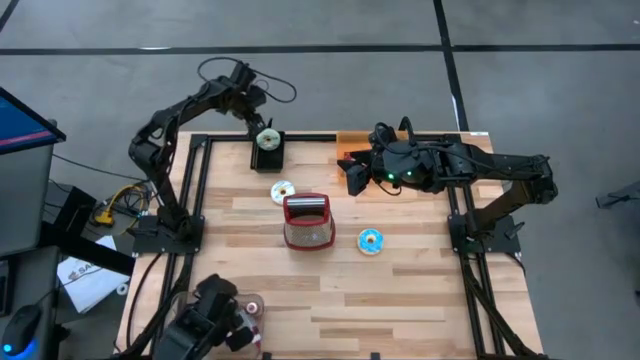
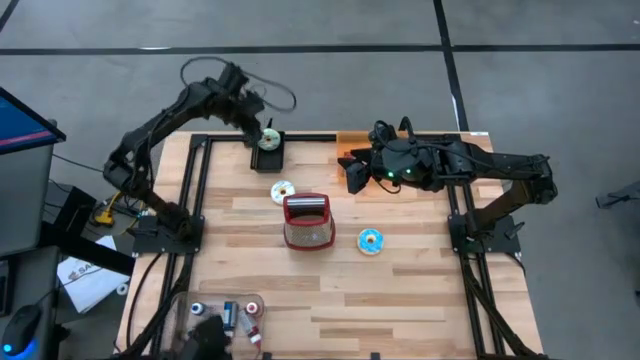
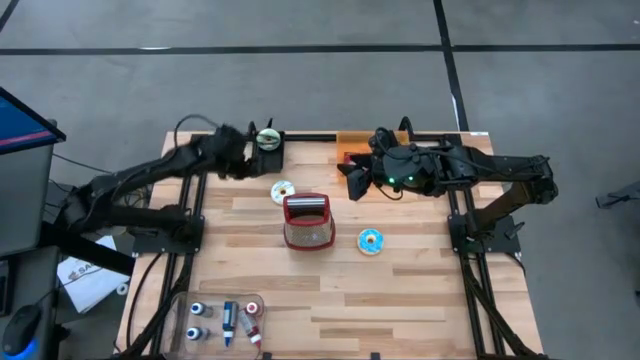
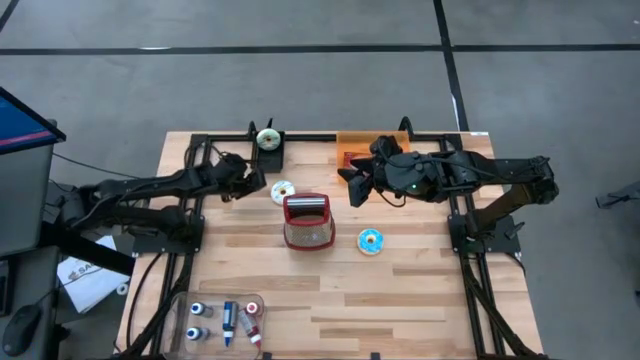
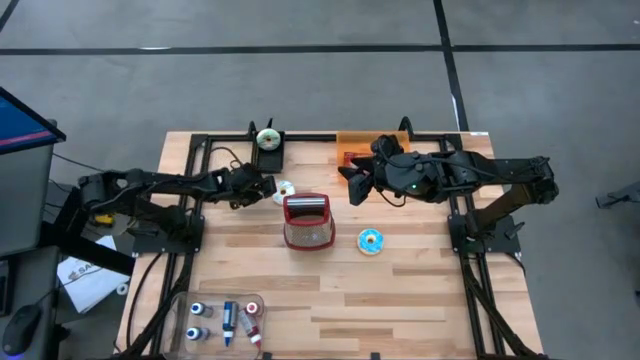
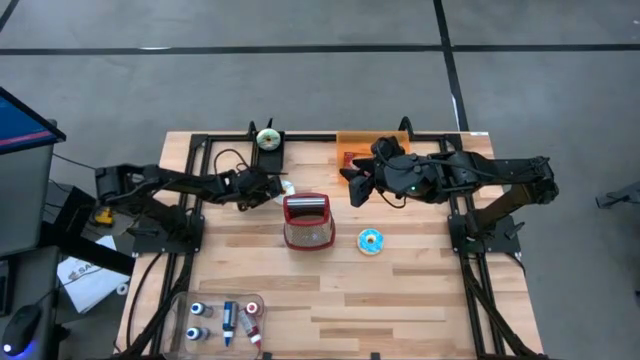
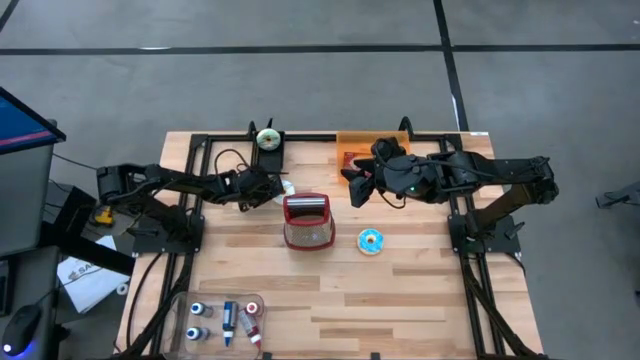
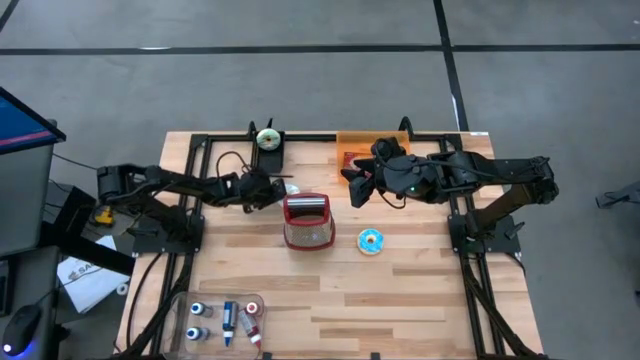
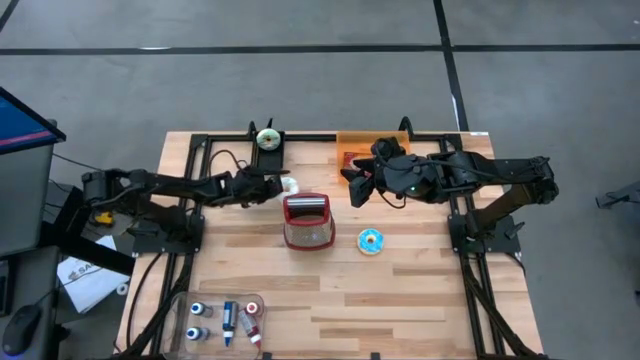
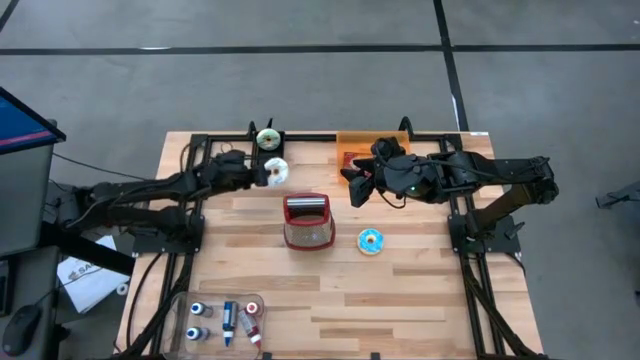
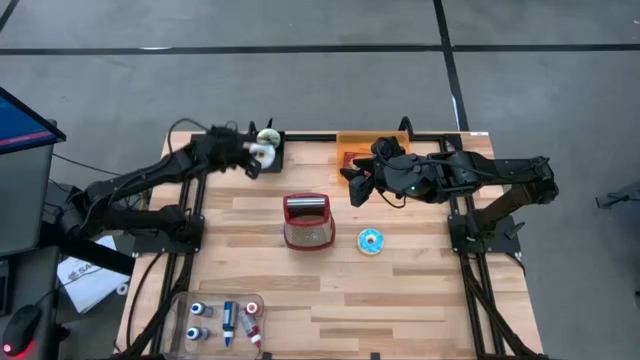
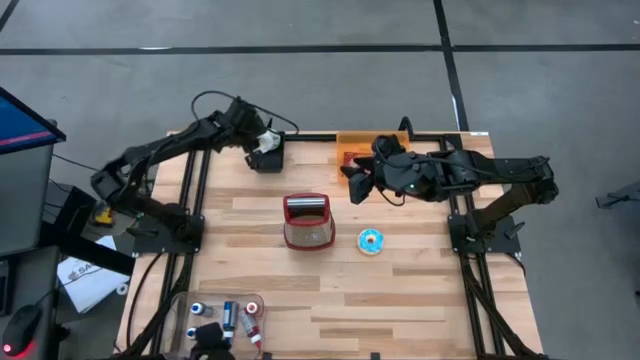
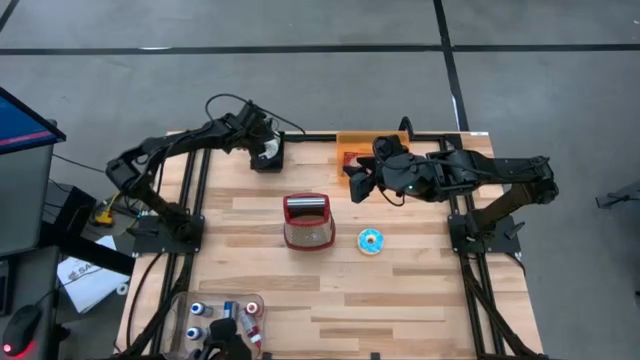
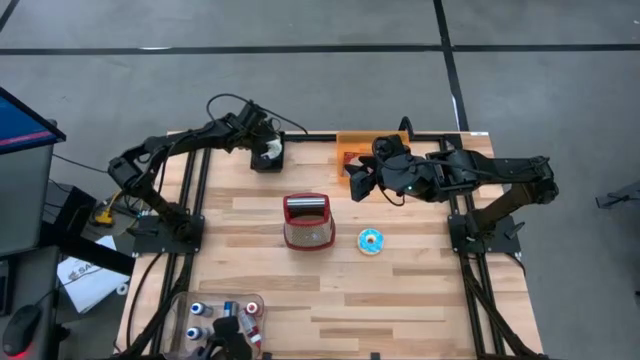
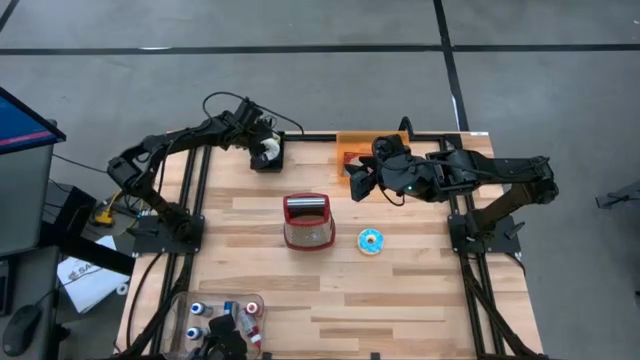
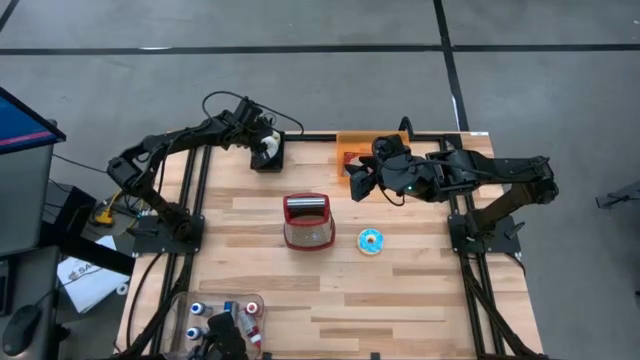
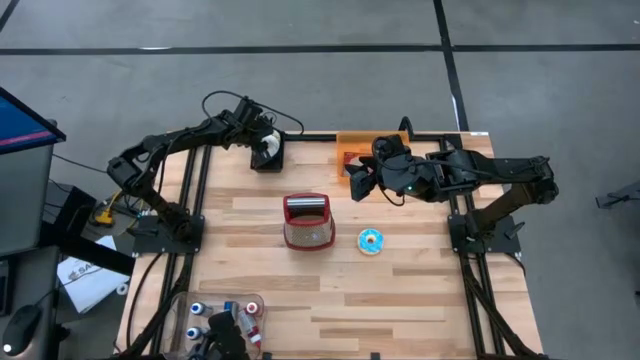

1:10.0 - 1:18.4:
Put the white donut into the black bin

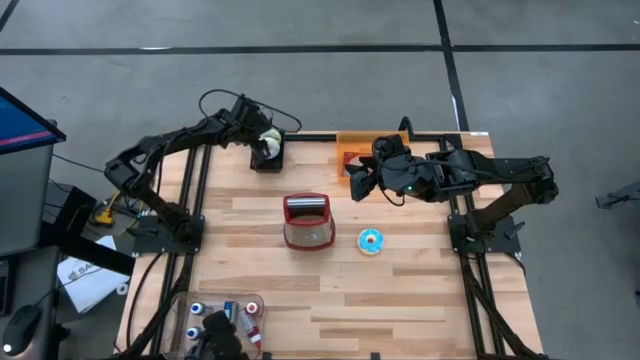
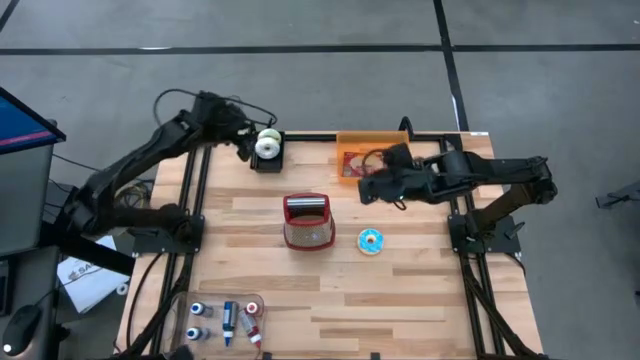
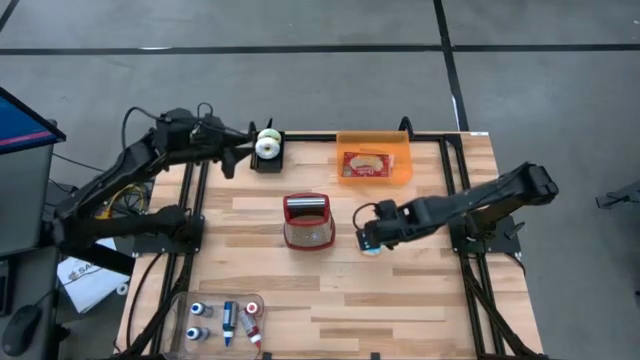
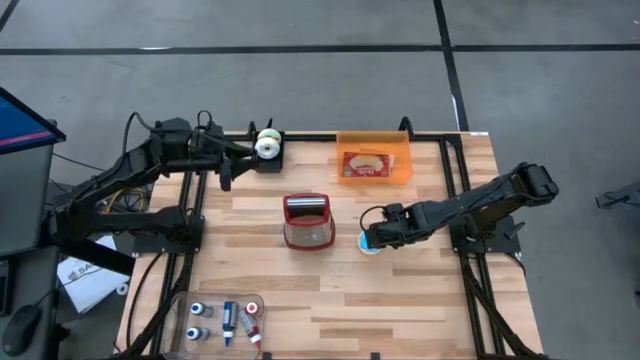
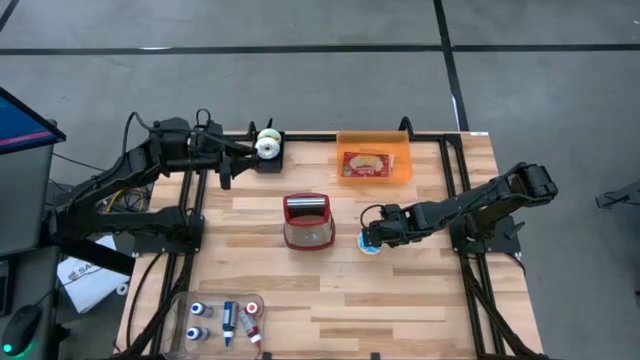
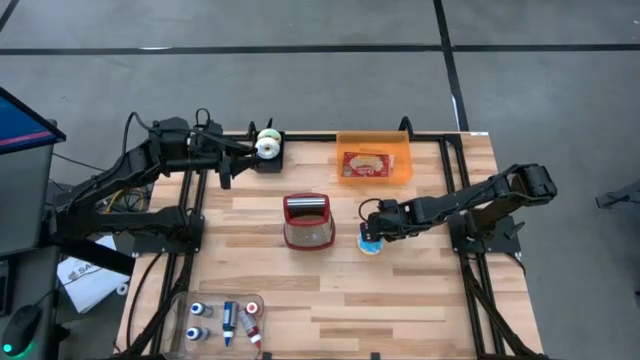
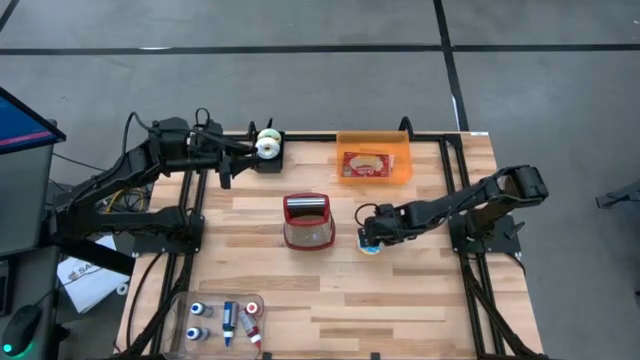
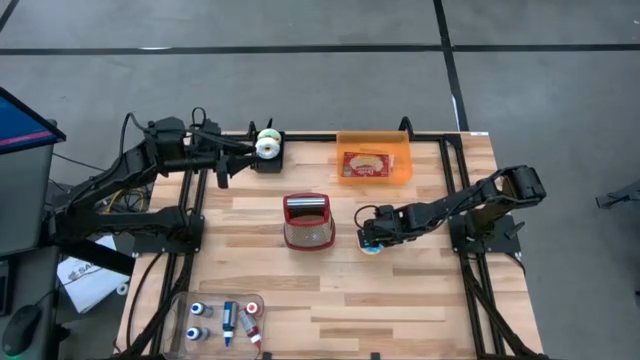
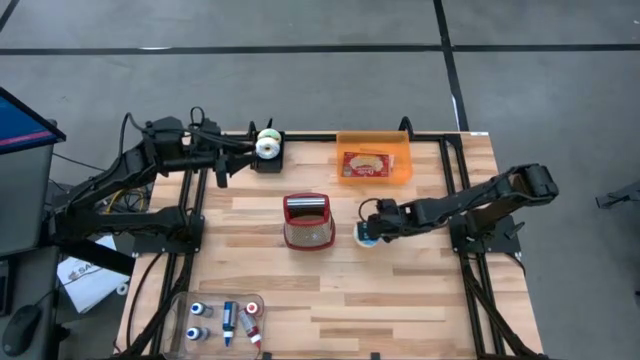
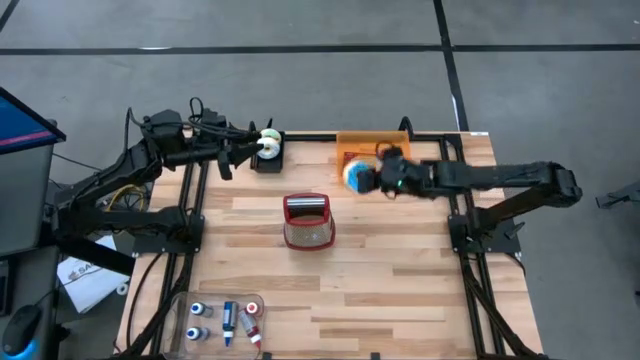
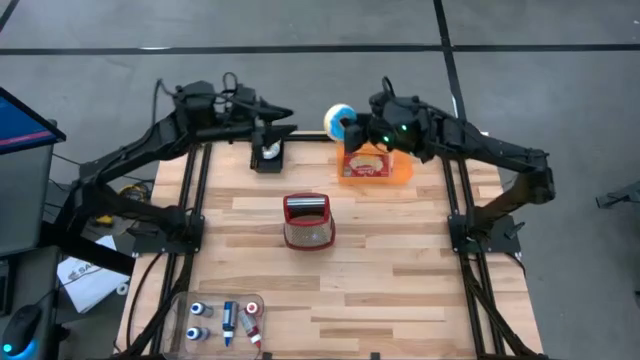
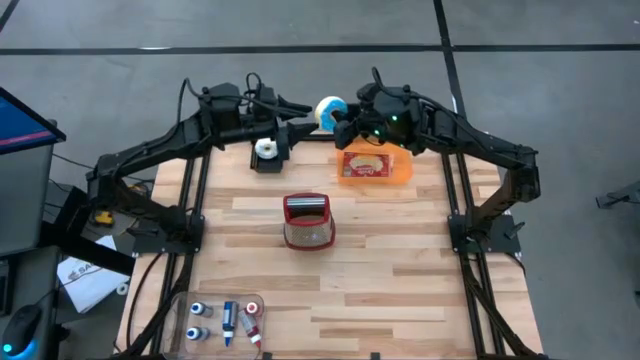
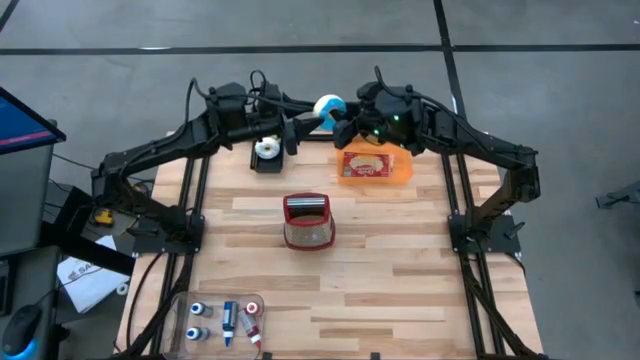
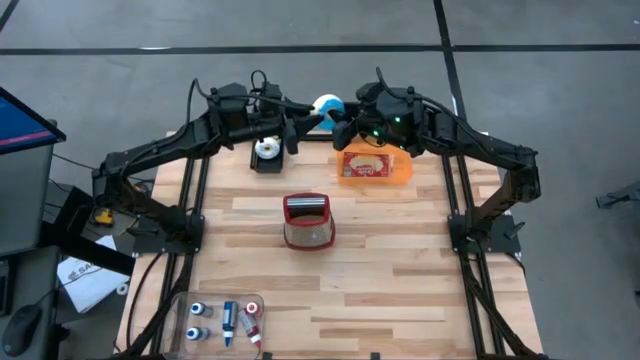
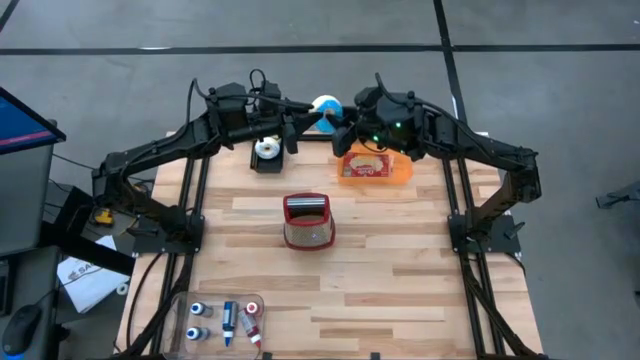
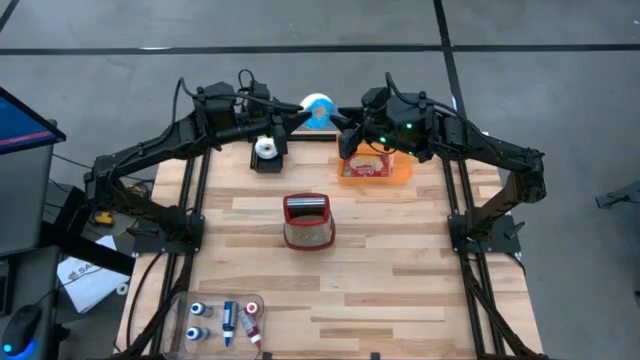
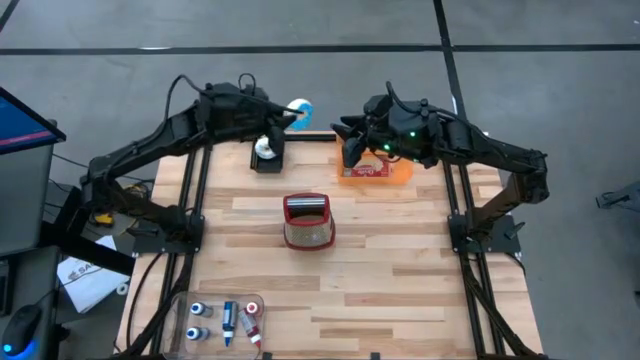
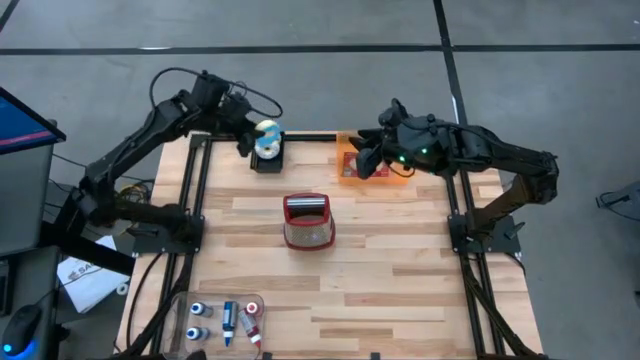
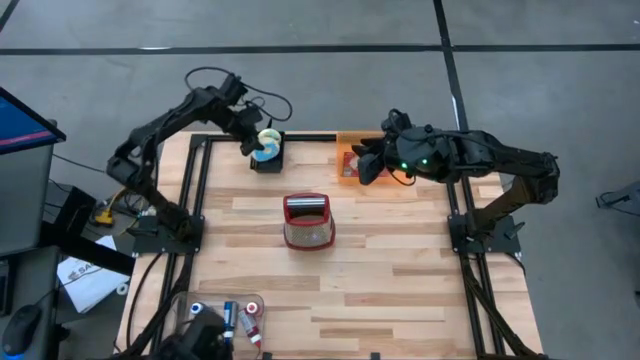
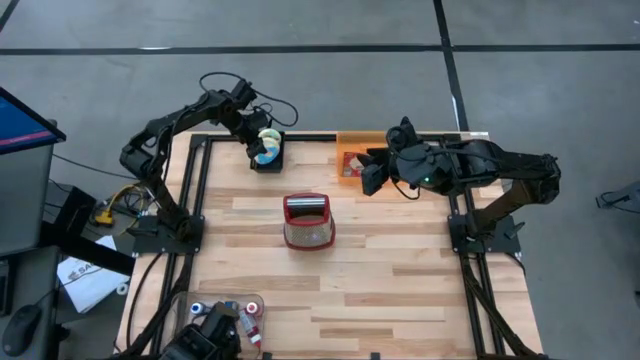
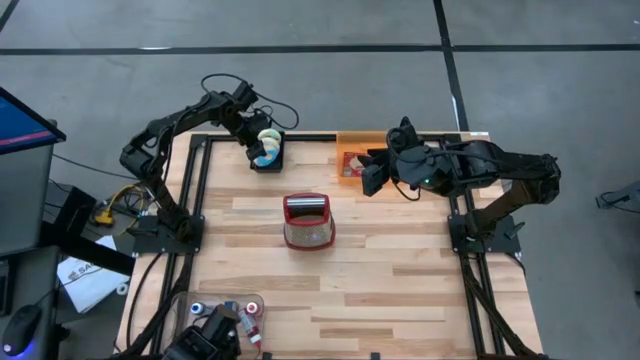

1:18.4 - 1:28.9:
Put the blue donut into the black bin

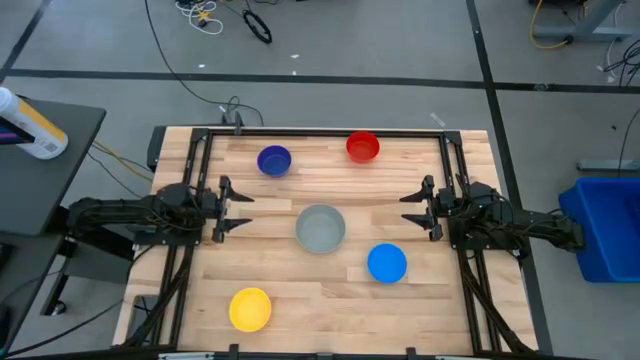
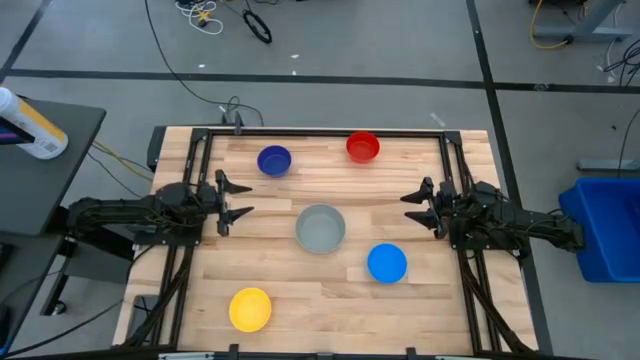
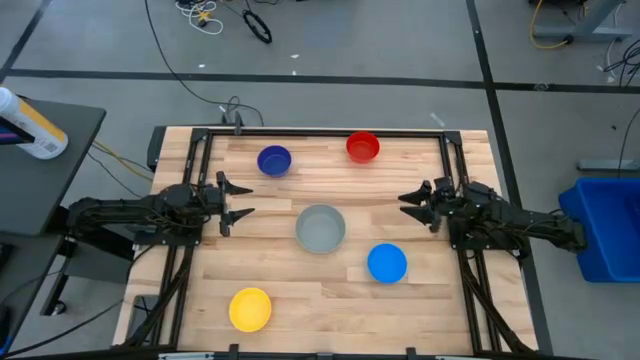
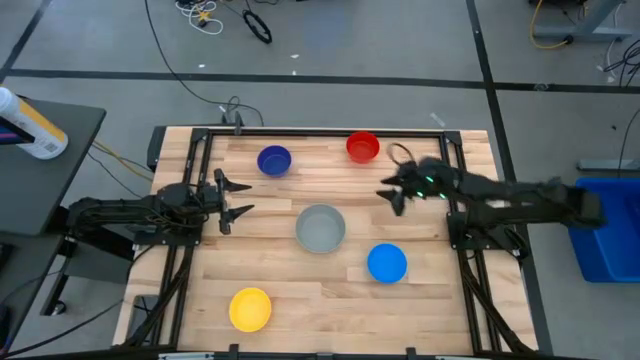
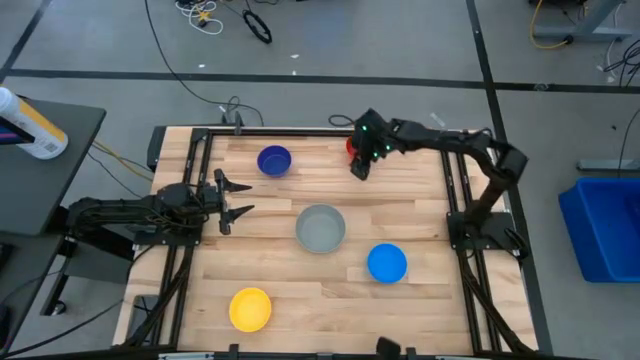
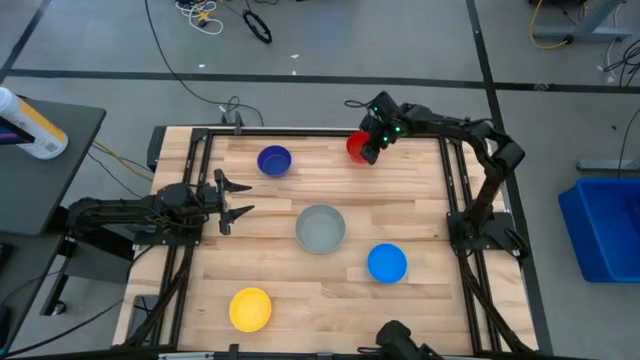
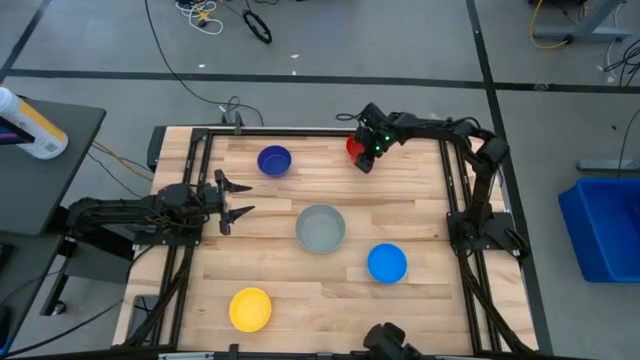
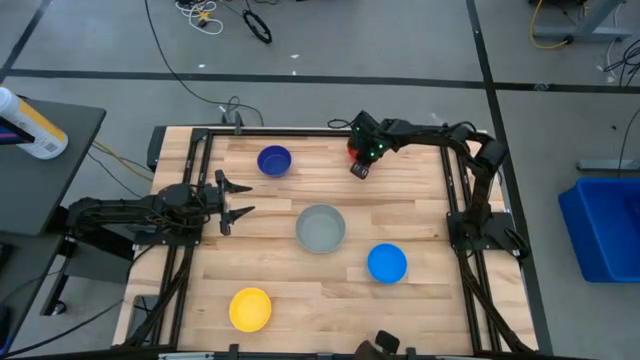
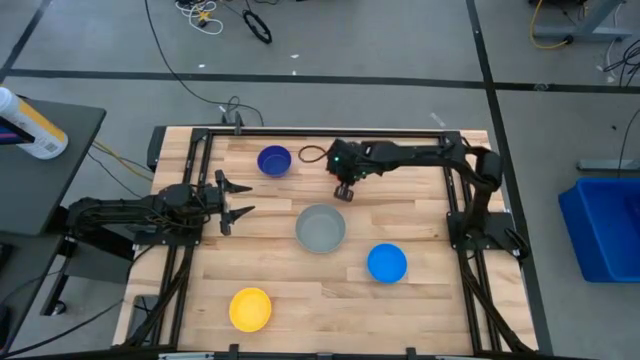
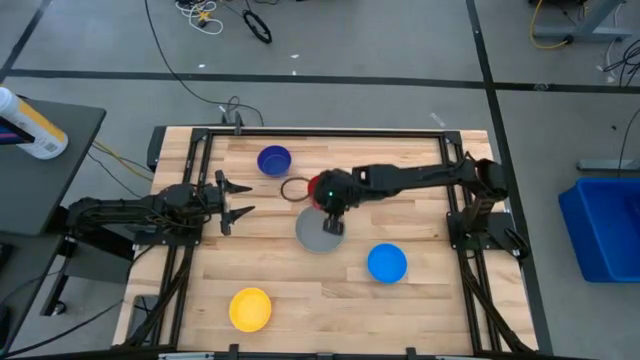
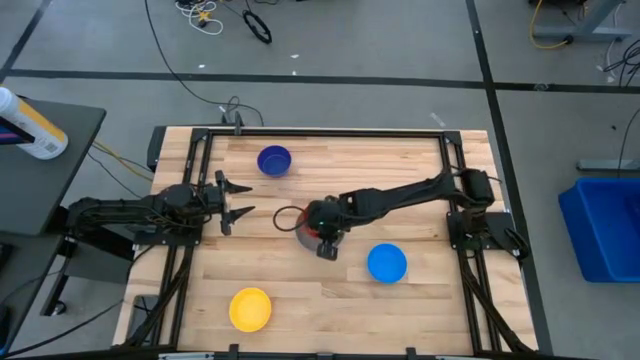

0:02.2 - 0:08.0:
Stack the red bowl on the gray bowl
